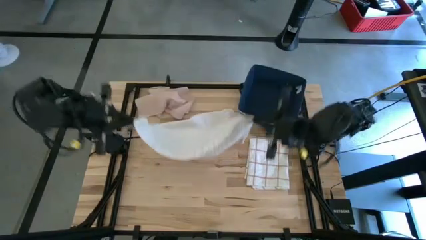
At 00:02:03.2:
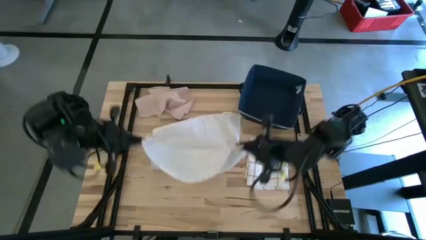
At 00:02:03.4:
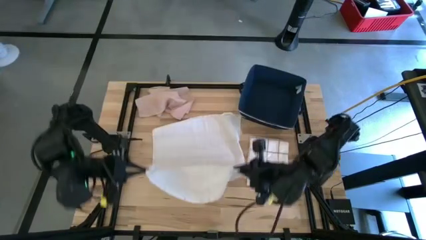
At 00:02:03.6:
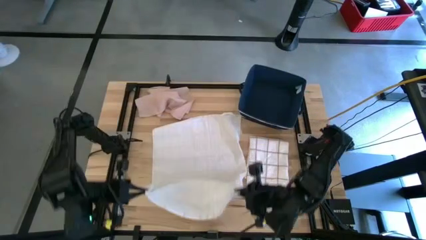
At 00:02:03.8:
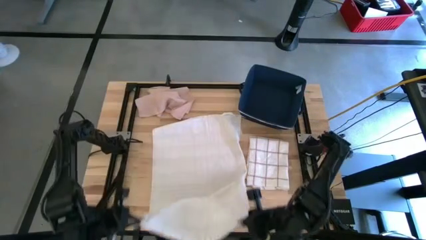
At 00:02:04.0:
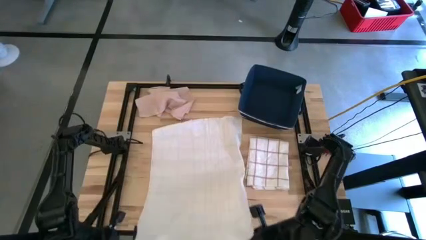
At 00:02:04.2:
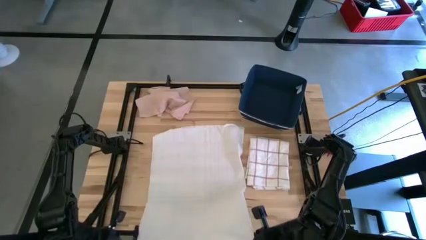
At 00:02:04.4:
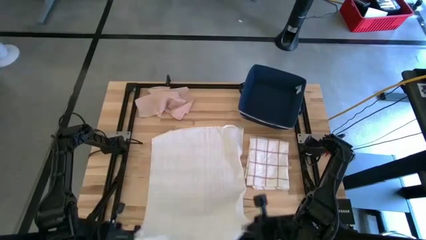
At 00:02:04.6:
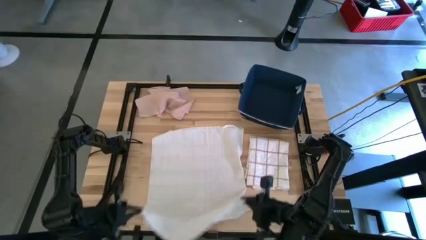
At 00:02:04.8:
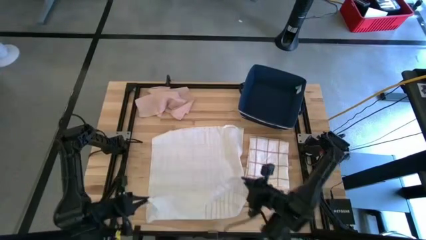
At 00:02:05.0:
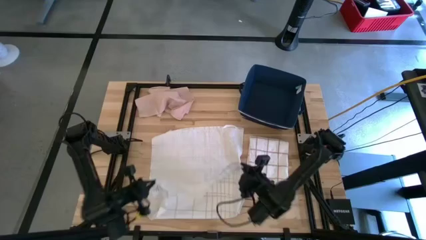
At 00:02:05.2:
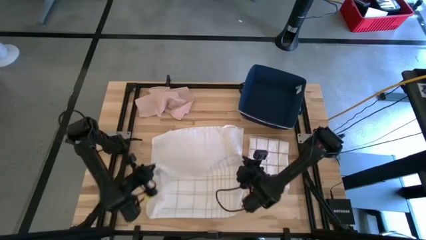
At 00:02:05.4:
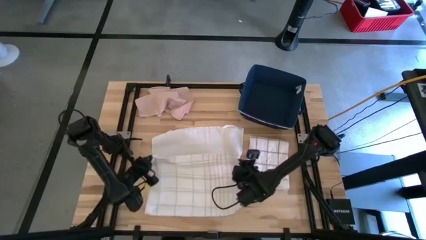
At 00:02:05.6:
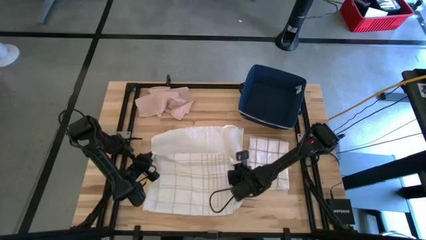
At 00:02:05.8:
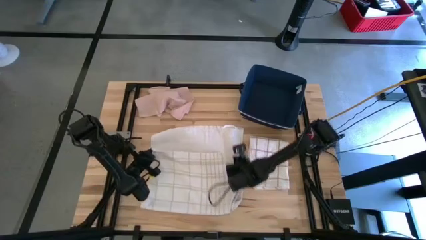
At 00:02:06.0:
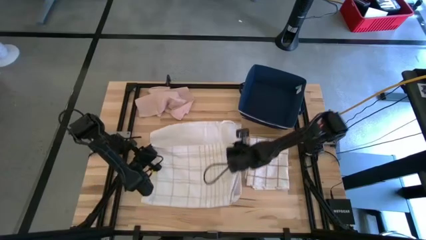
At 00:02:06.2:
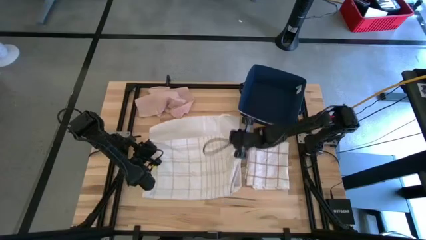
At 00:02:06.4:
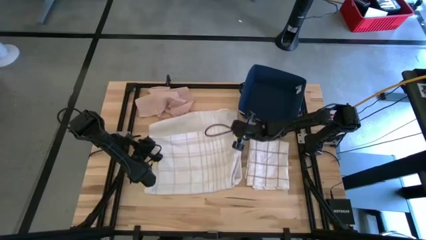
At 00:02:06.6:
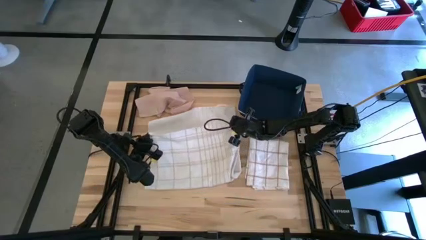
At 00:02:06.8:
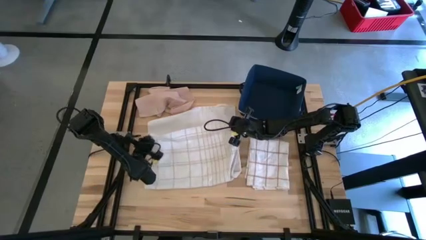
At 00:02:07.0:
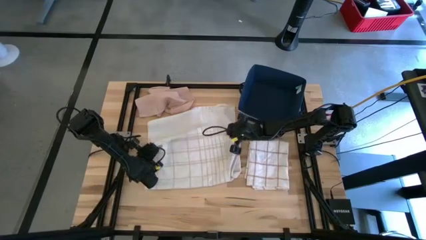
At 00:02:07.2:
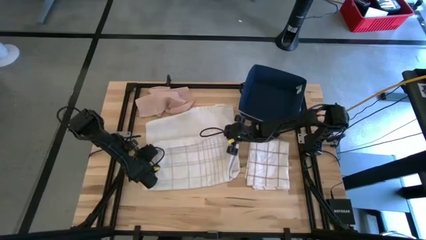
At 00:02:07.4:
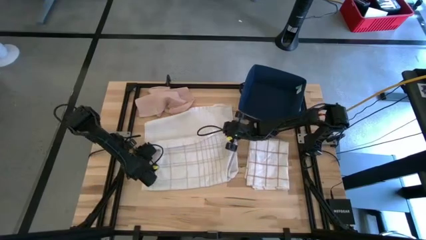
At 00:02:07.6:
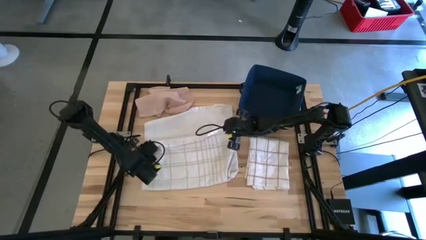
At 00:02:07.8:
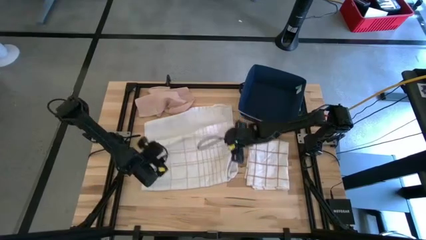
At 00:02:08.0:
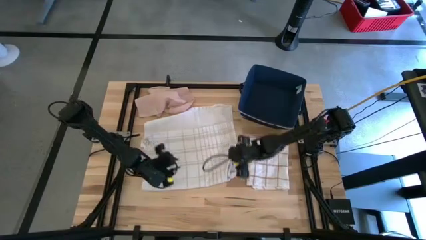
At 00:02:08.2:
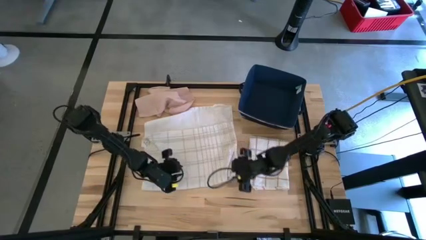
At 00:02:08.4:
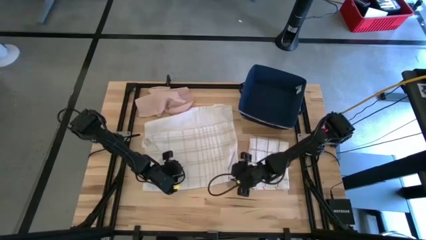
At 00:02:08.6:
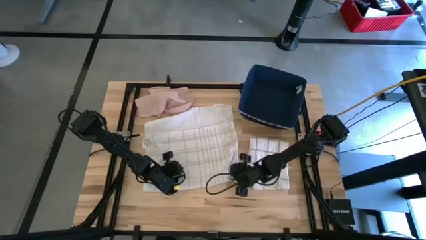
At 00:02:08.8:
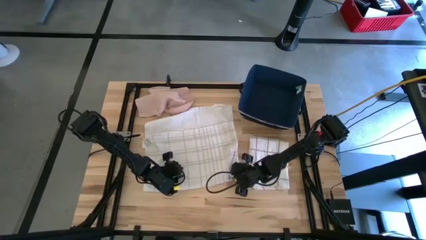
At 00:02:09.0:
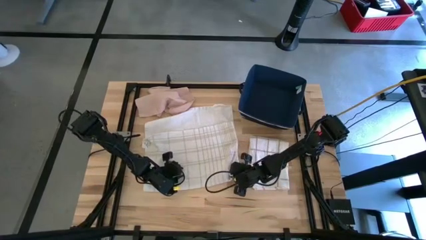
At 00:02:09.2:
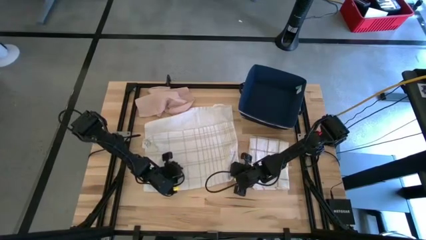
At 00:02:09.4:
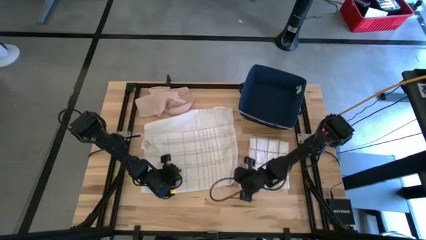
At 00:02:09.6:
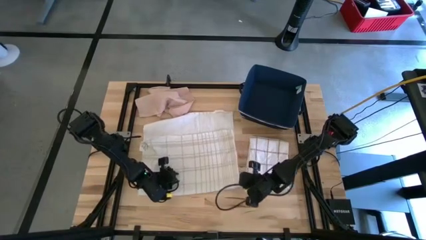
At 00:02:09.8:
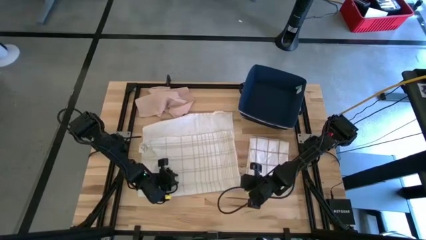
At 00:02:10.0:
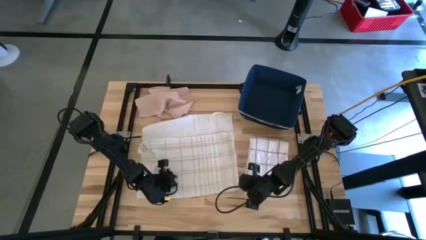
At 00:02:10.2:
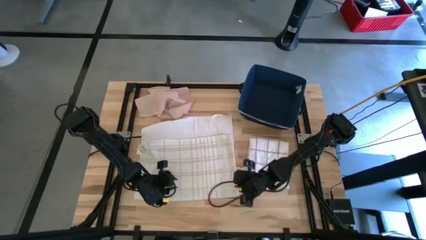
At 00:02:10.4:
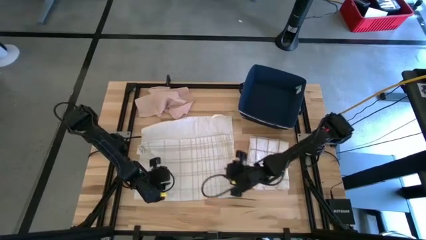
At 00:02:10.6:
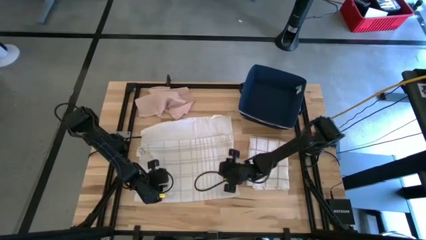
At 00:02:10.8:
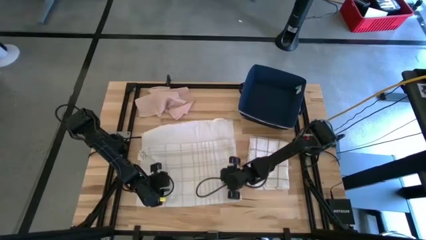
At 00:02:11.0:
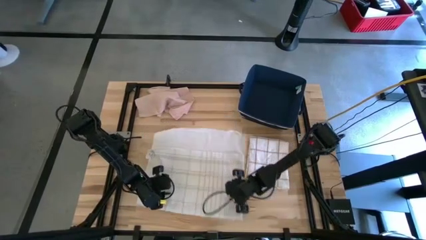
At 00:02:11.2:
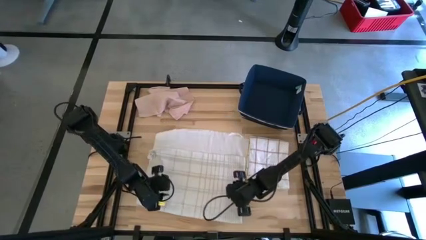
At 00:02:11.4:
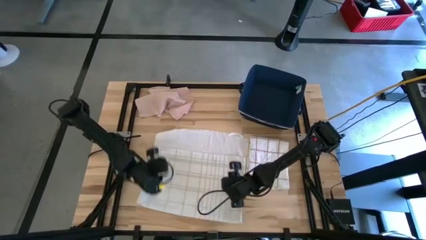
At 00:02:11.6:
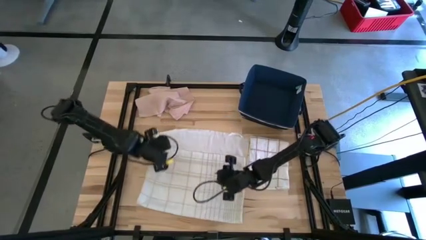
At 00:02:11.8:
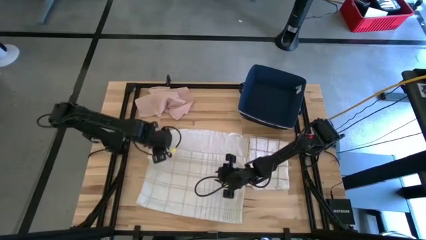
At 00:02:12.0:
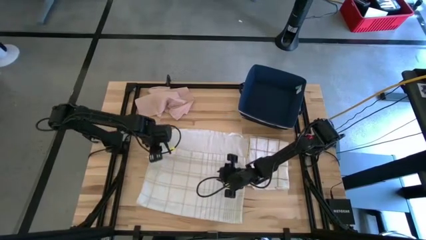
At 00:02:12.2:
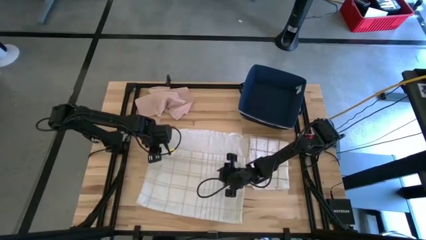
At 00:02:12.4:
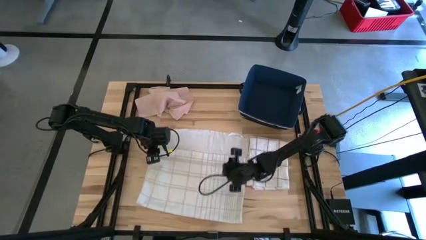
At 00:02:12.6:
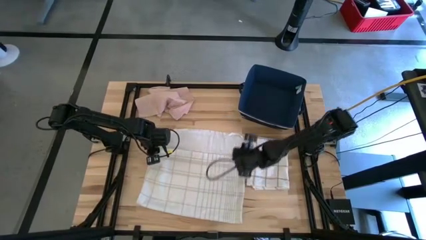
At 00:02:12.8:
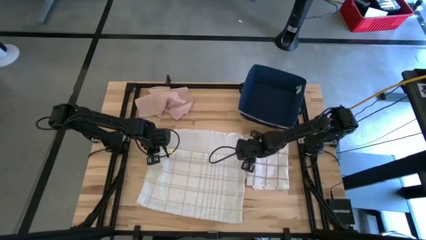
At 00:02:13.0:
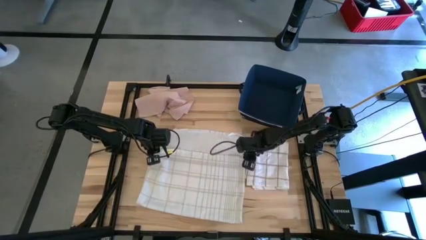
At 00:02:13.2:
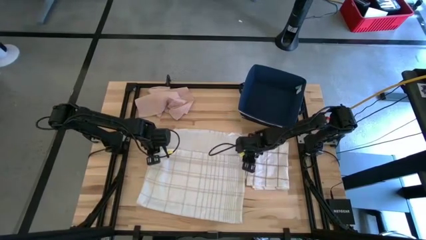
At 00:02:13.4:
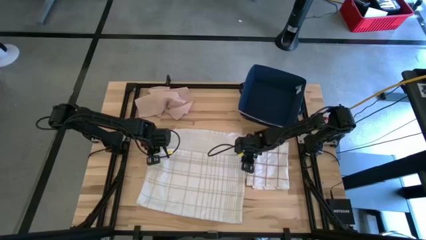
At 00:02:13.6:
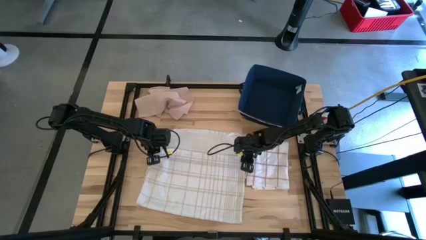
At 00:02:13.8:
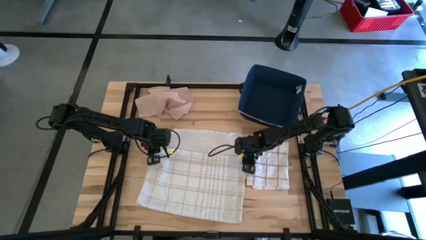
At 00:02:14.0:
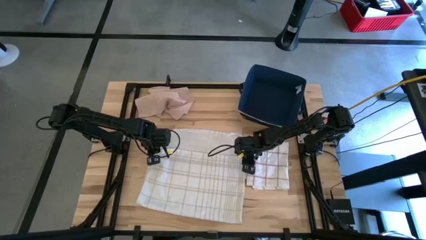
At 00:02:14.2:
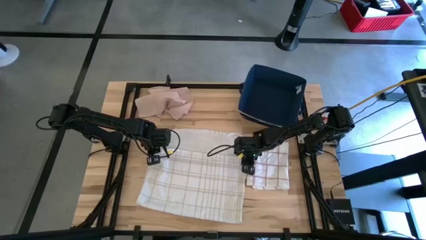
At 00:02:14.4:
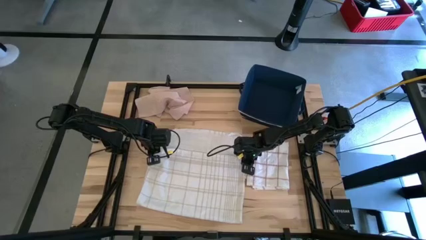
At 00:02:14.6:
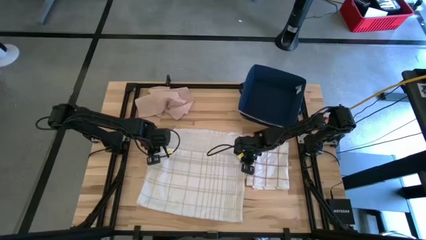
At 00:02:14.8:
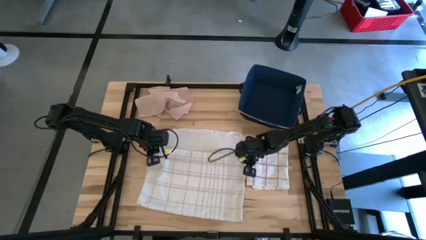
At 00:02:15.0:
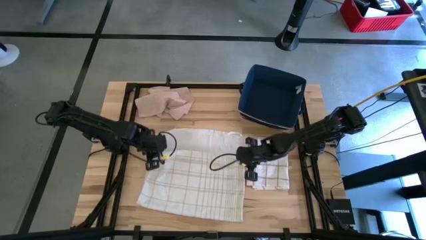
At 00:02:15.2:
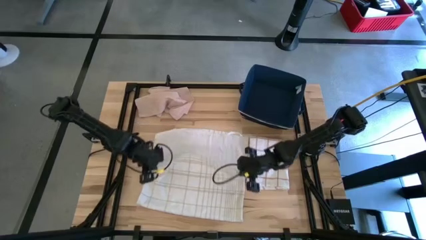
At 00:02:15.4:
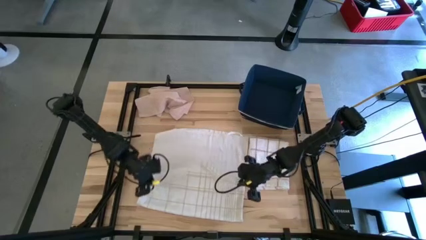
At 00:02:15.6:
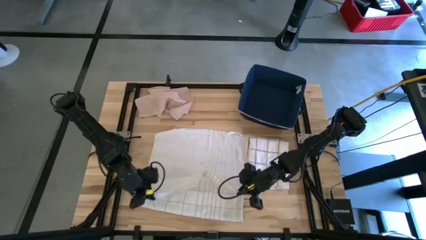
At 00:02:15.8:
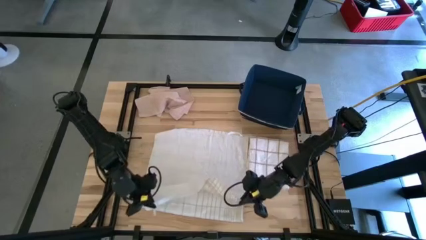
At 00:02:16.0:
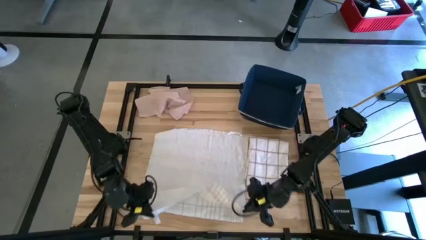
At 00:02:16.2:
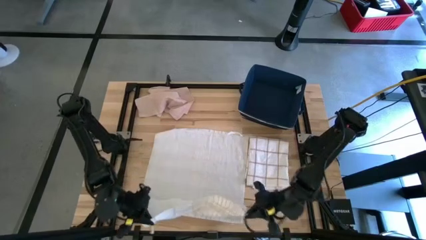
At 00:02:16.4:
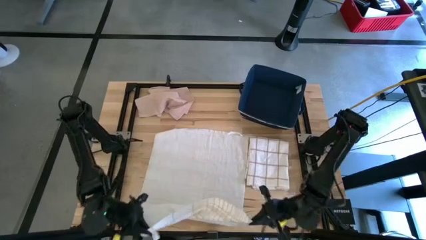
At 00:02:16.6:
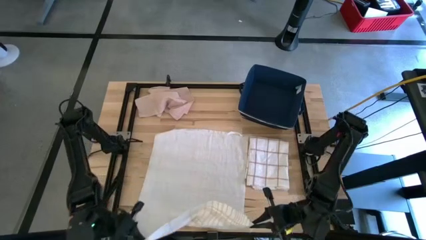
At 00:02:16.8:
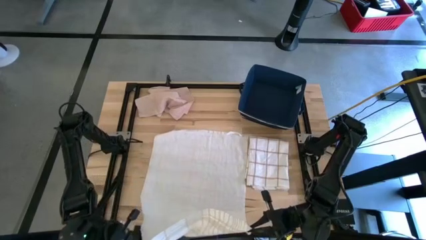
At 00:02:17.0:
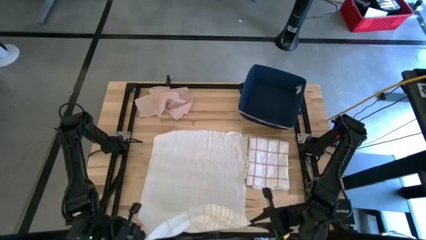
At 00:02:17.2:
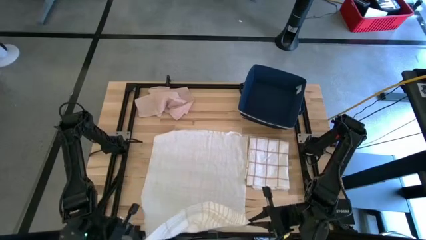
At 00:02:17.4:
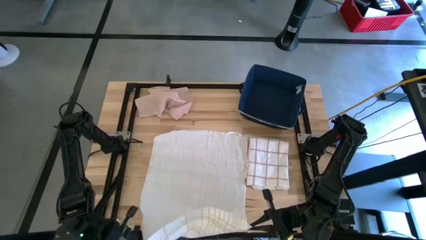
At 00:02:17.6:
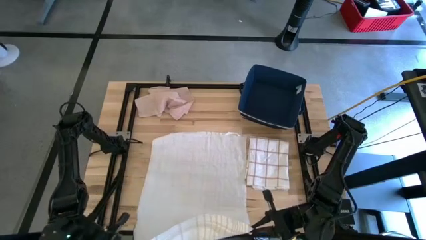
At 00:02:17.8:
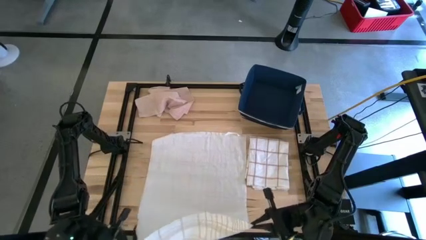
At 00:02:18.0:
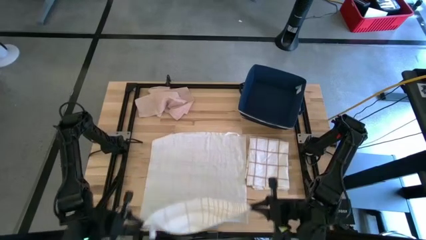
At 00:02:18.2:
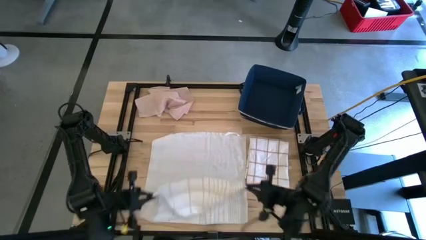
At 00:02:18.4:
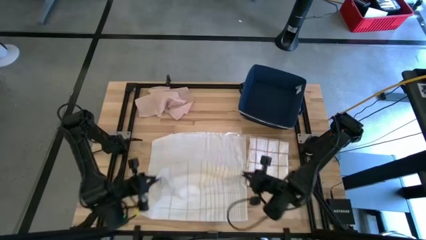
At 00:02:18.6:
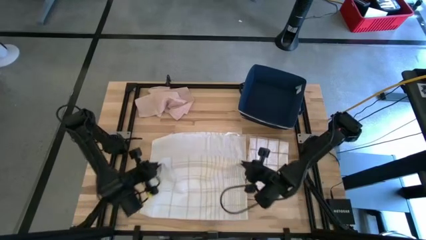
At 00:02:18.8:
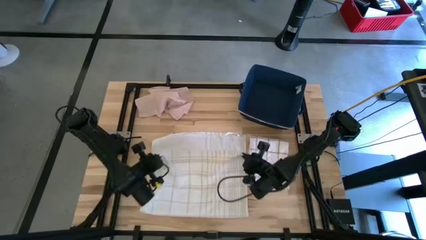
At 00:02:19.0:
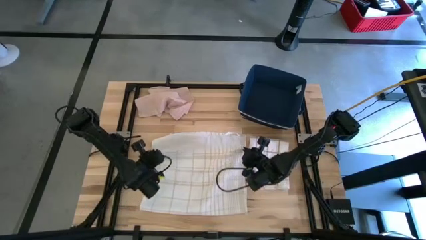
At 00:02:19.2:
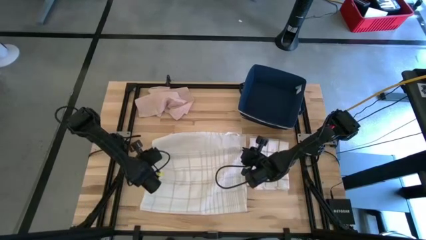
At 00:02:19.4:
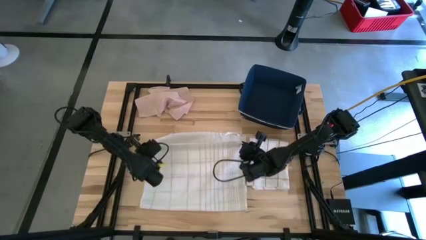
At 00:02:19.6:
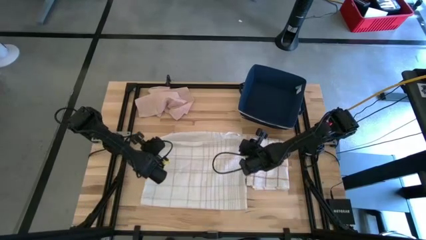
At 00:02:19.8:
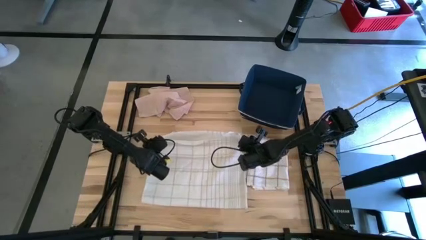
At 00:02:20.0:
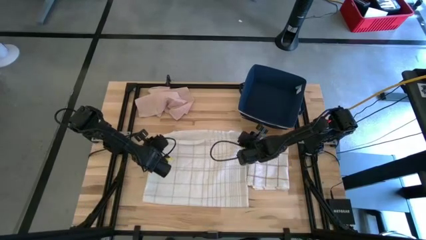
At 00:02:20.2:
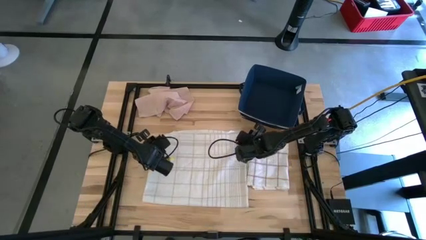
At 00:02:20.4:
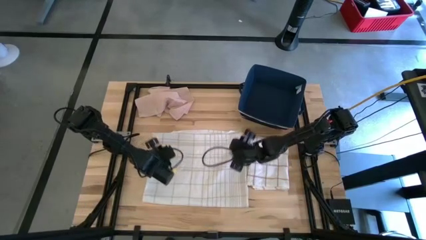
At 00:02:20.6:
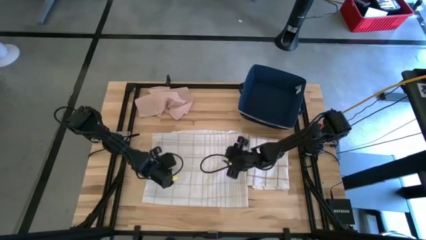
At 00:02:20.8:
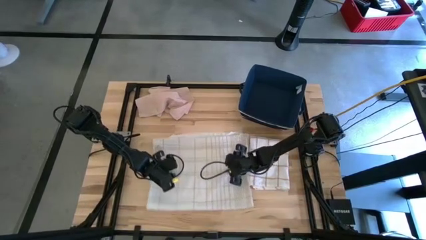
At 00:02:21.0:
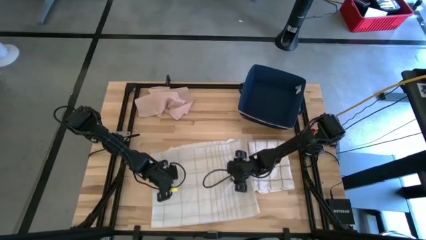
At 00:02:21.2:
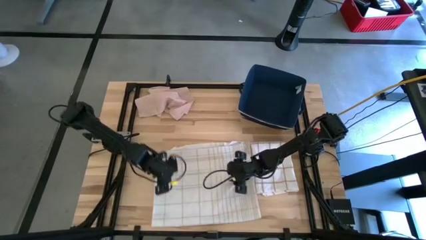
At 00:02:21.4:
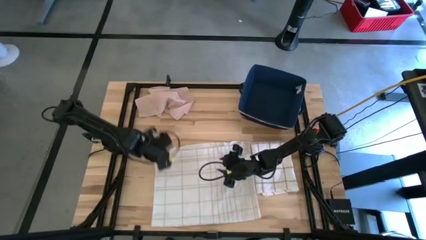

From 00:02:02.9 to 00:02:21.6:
Task: Fold towel
Fold the white with grey-stripe towel
